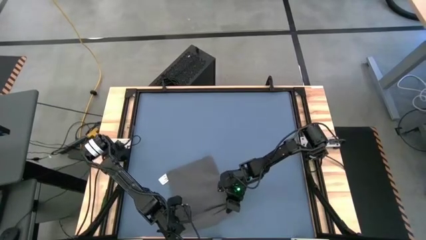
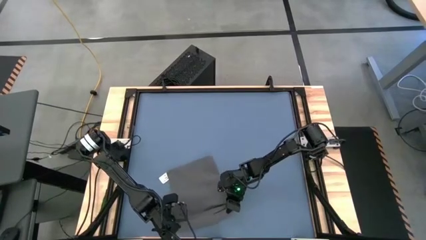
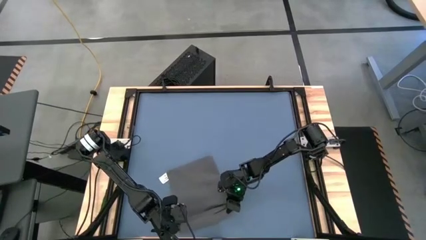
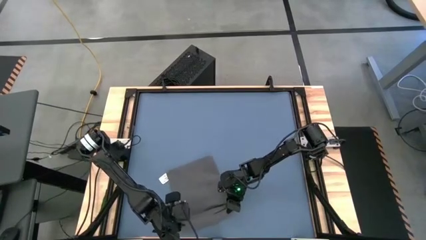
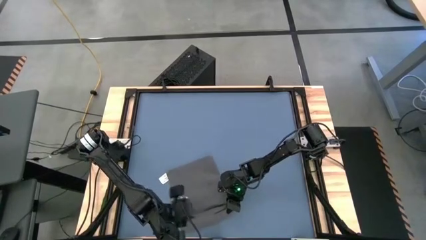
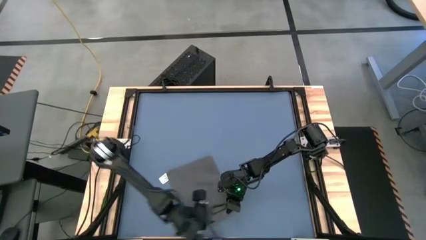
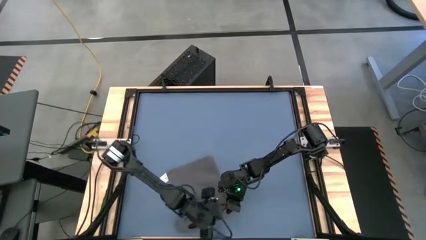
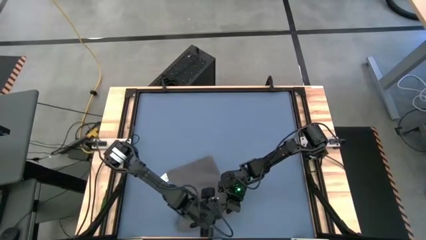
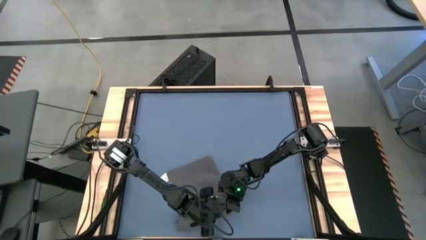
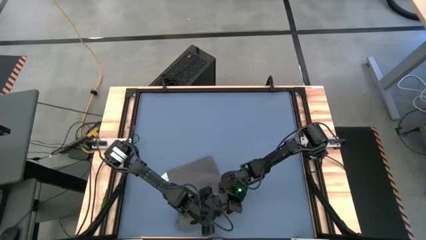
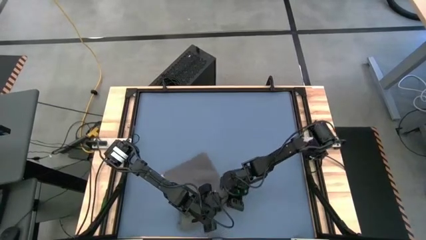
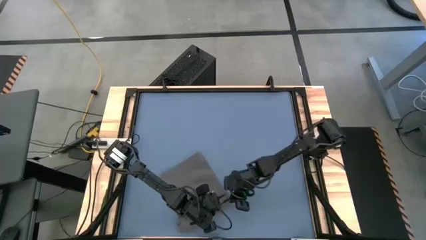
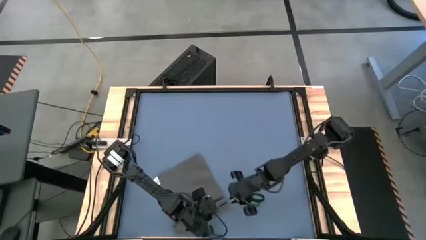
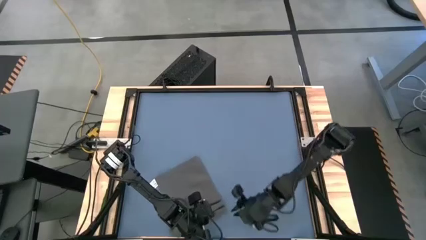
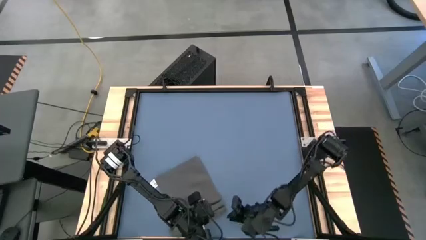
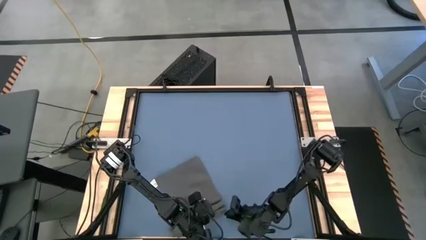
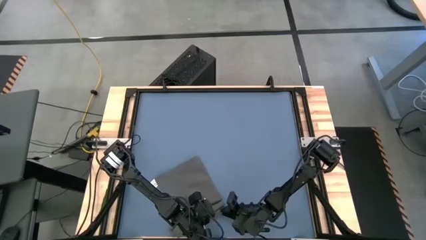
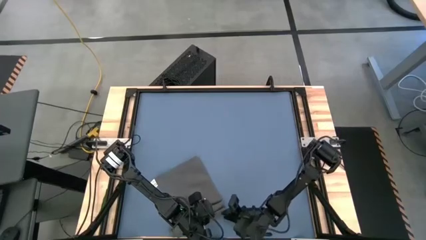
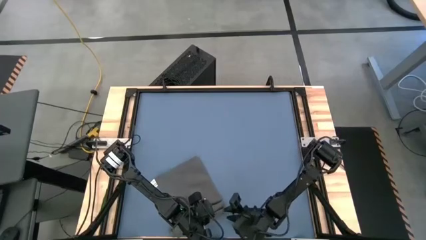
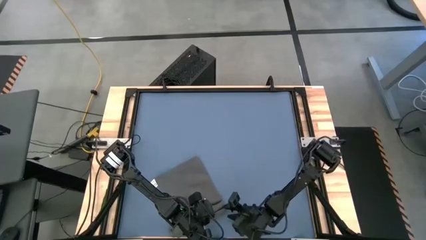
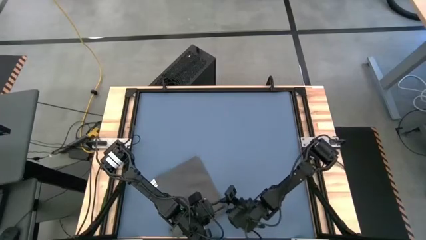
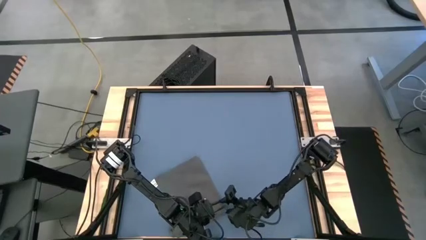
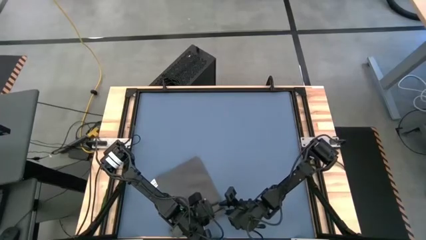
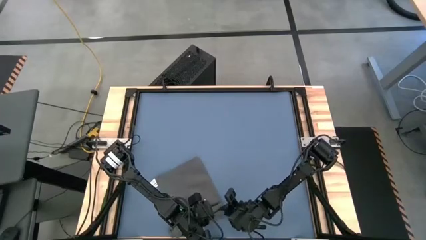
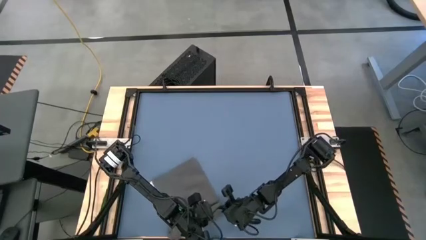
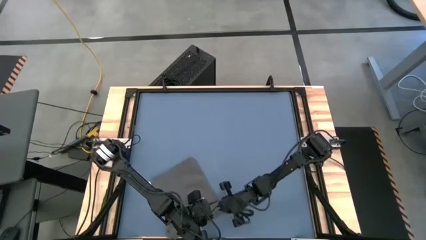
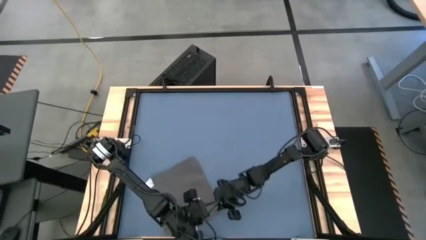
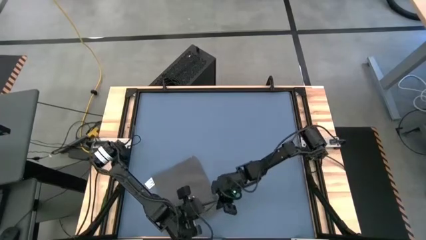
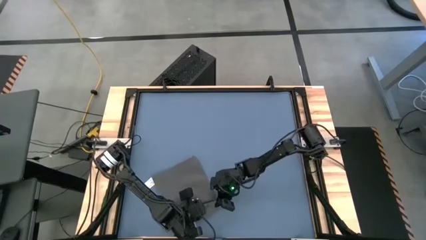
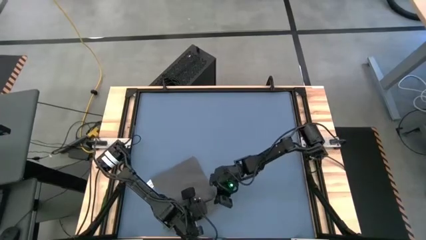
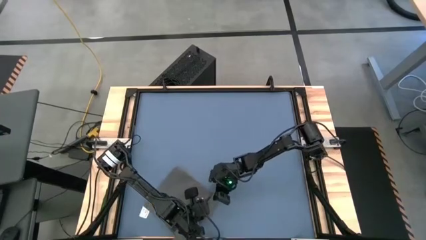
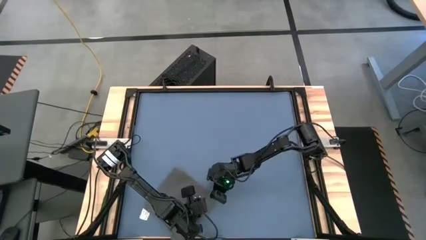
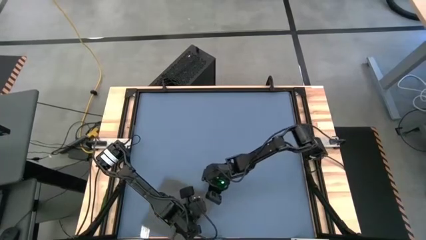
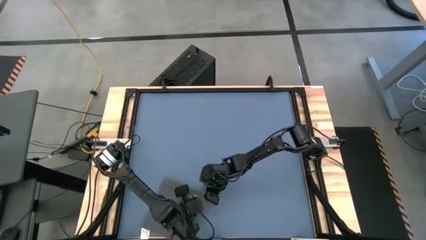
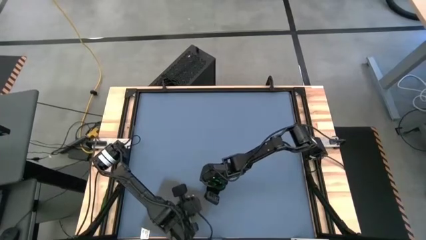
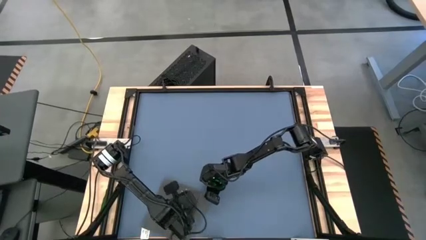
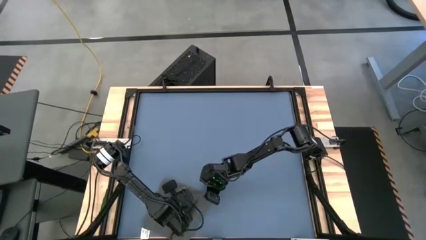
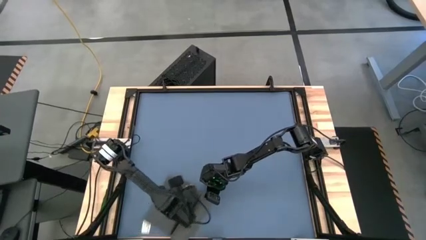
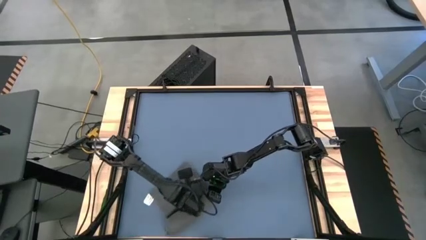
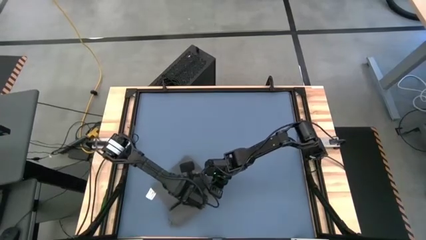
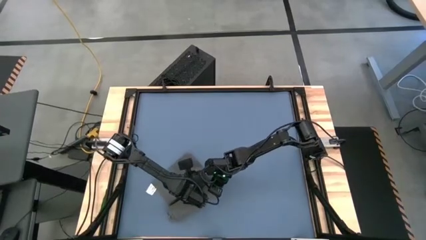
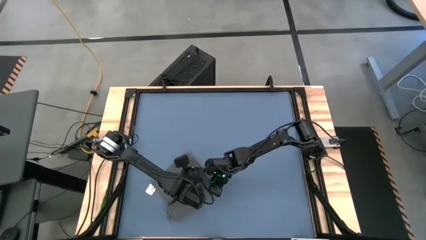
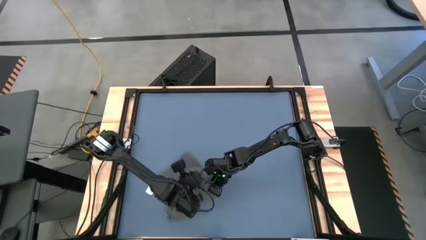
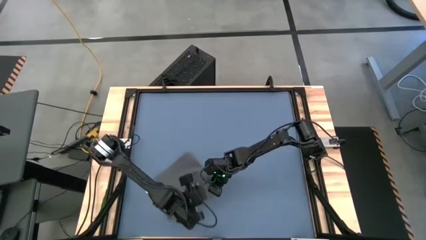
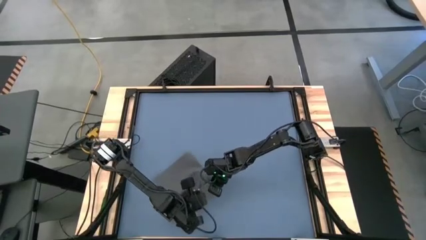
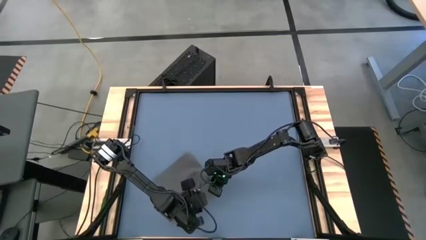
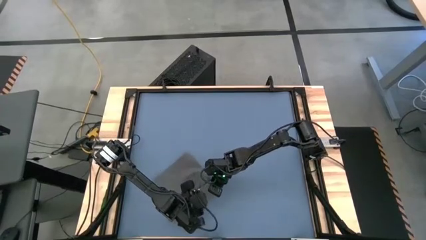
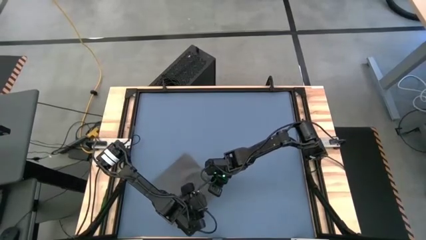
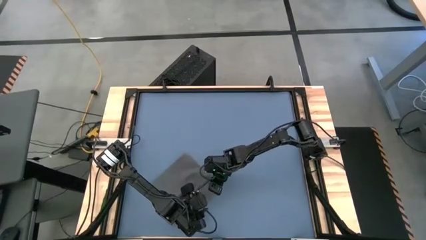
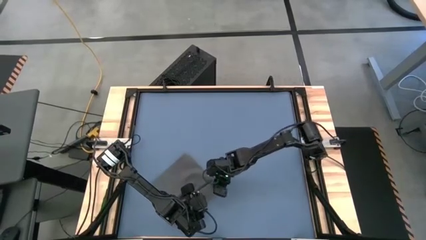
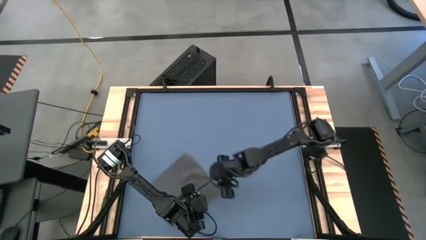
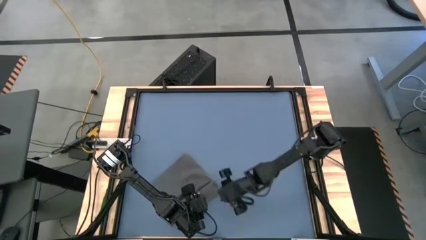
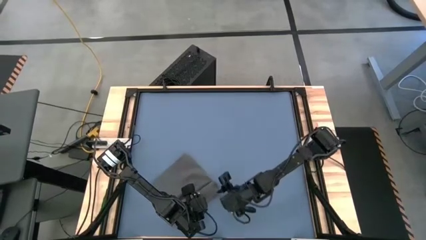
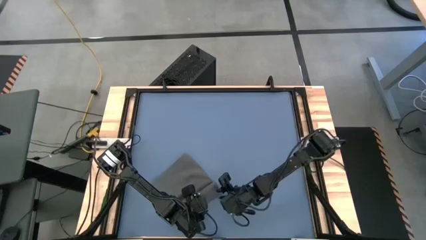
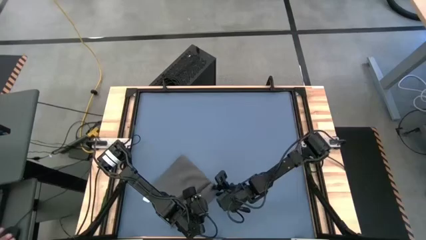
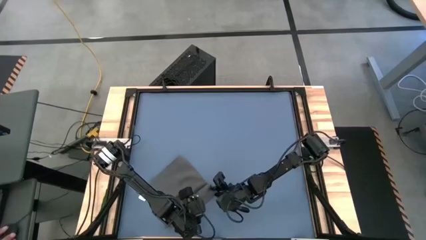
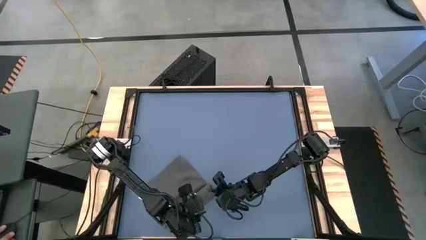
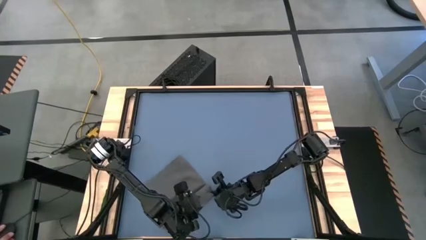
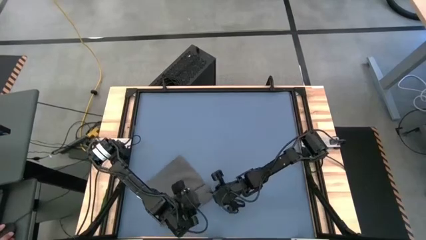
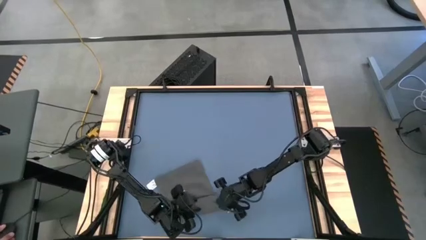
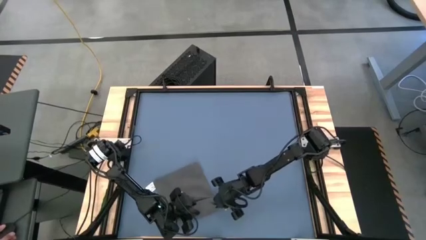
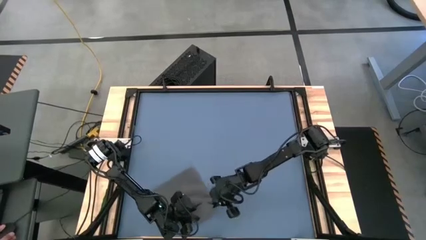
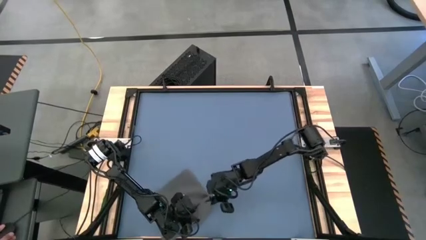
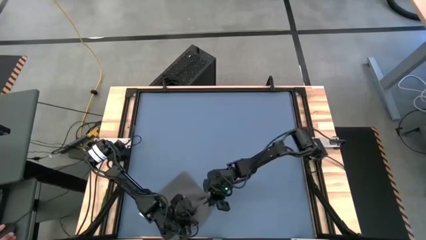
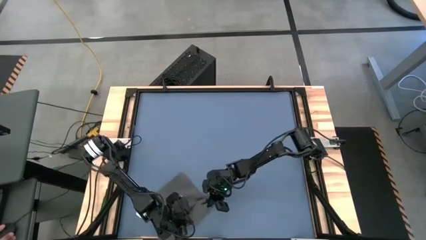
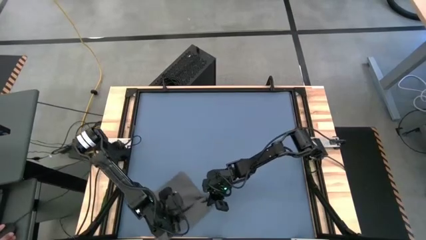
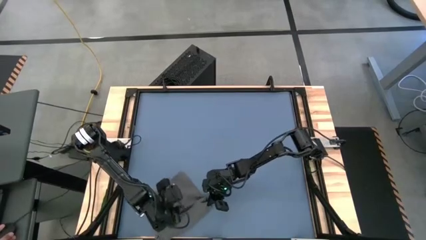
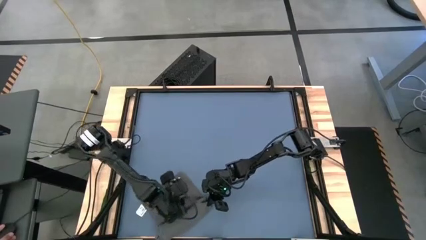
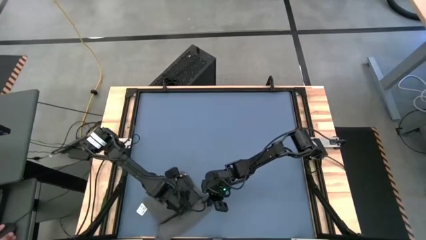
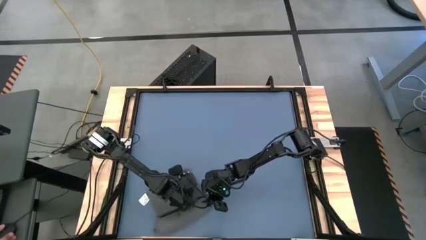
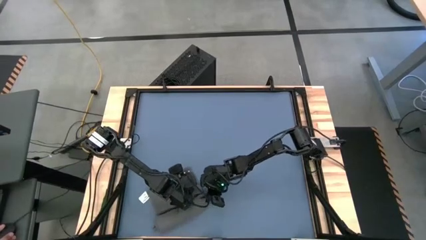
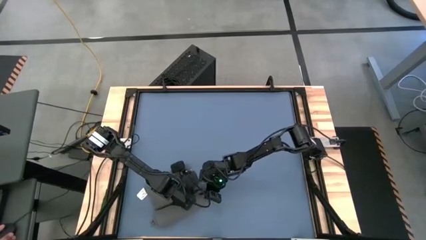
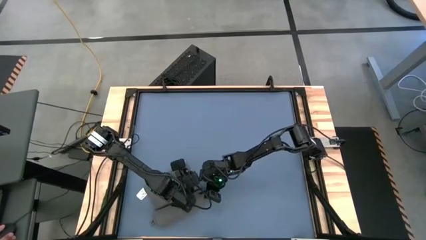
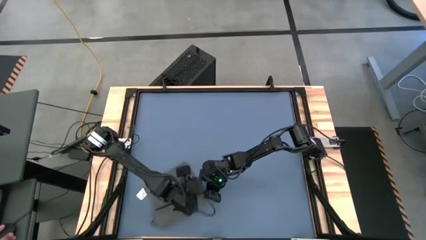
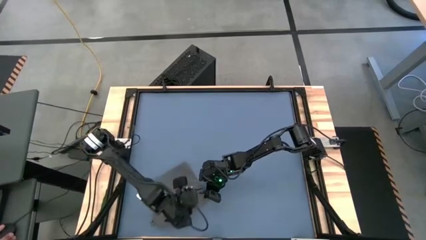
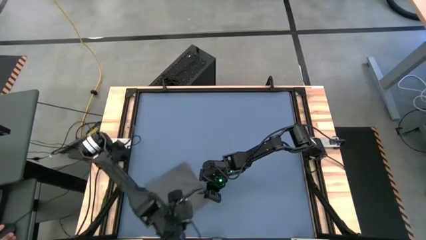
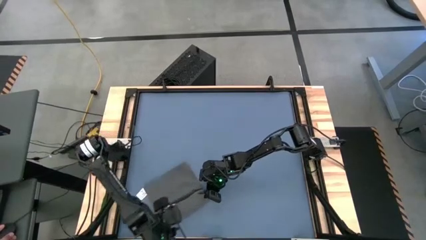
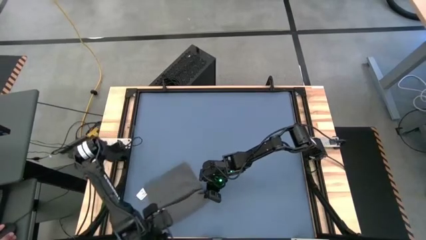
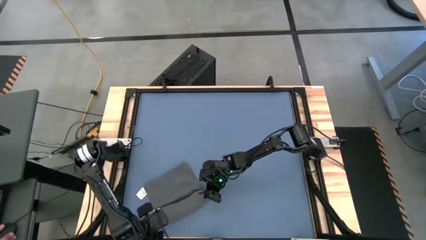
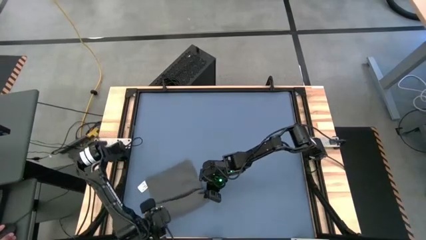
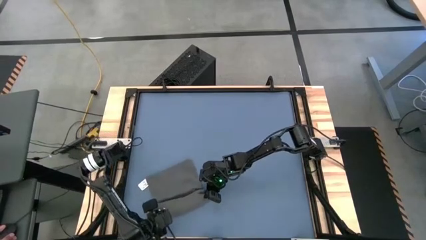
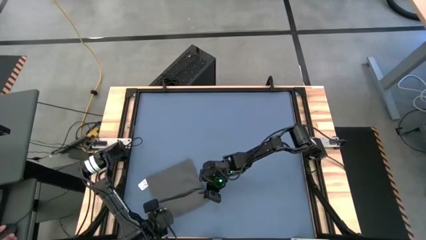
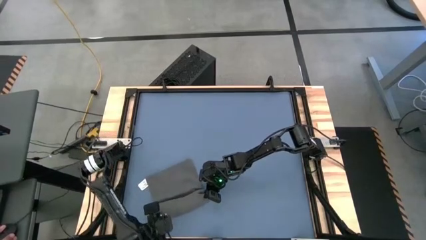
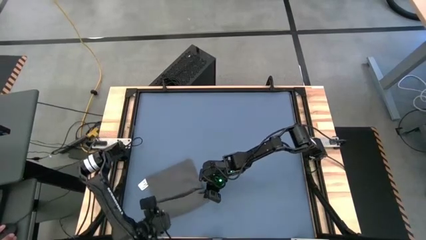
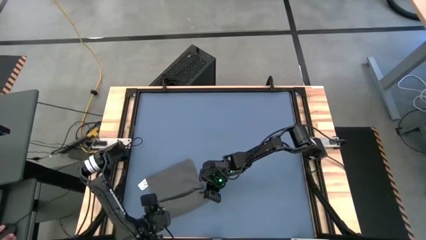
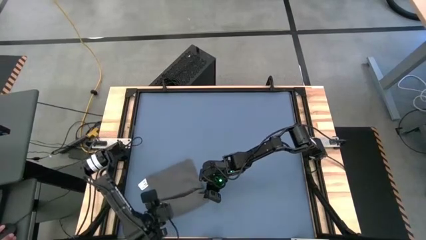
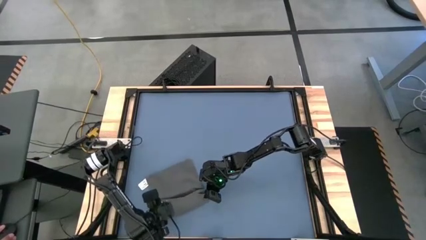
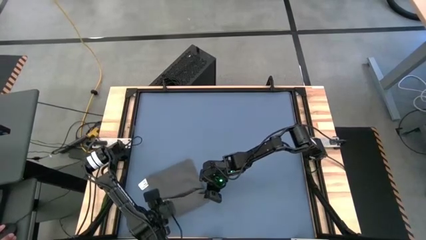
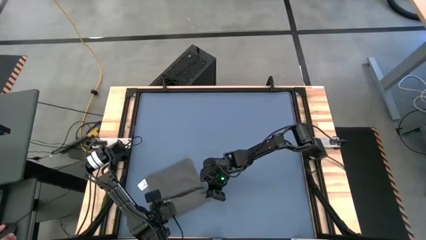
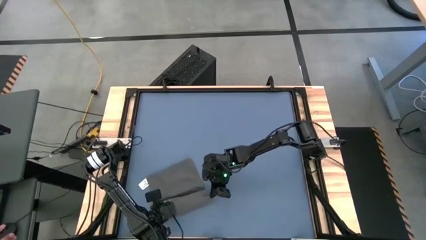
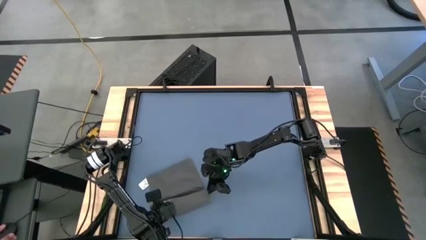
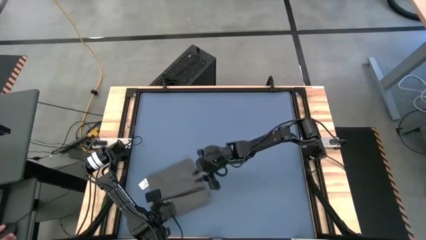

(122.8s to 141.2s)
Task: Roll towel into tight, uniform cylinder
Roll the gray towel
